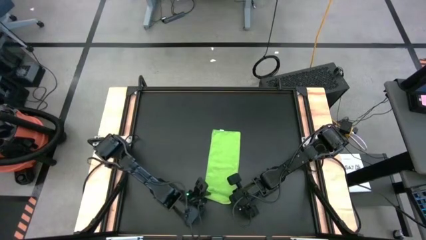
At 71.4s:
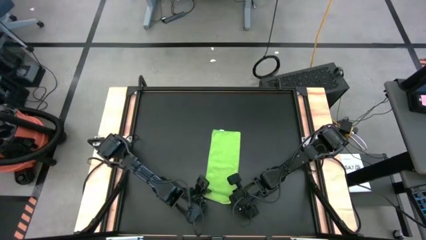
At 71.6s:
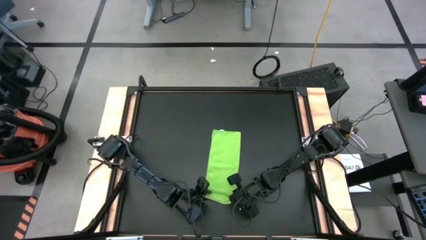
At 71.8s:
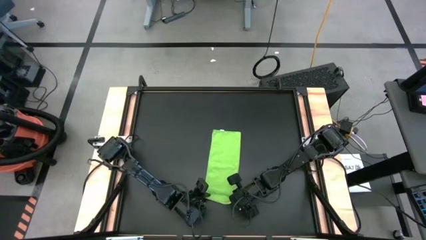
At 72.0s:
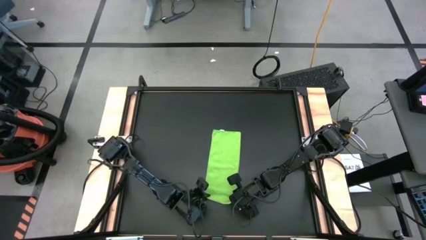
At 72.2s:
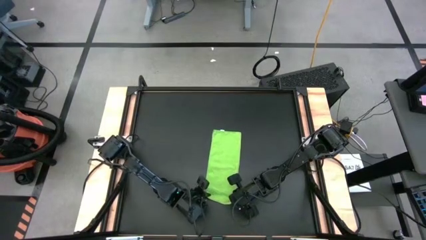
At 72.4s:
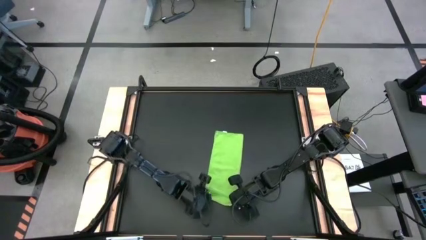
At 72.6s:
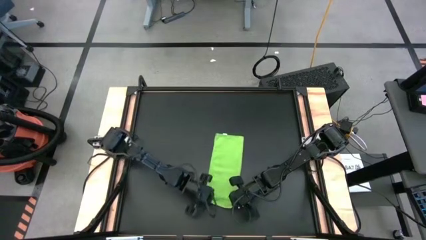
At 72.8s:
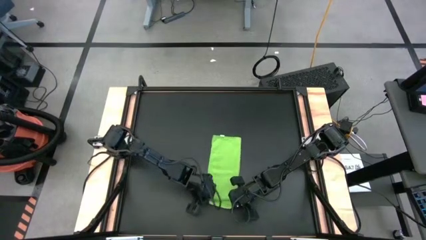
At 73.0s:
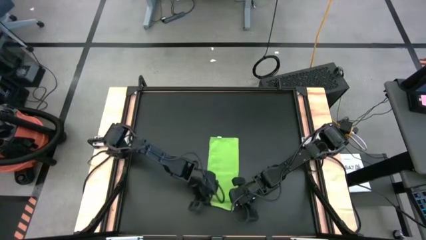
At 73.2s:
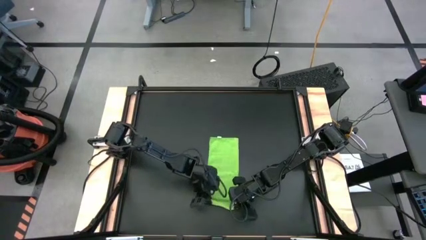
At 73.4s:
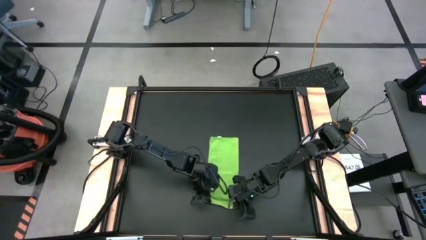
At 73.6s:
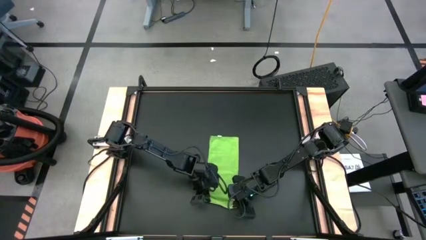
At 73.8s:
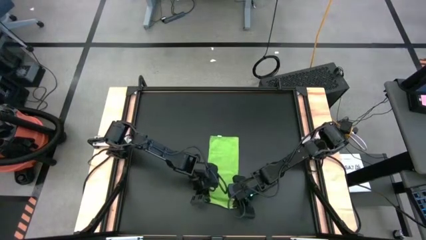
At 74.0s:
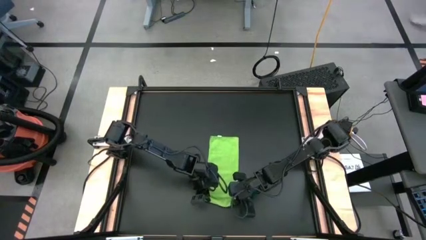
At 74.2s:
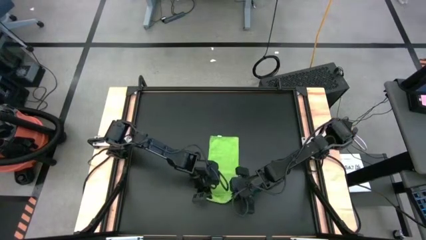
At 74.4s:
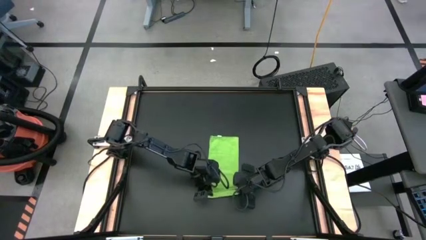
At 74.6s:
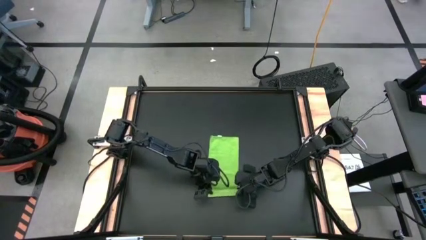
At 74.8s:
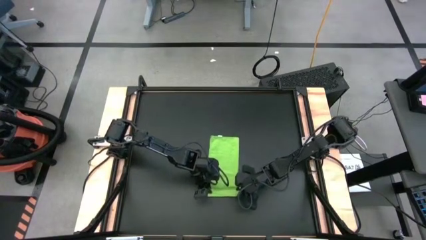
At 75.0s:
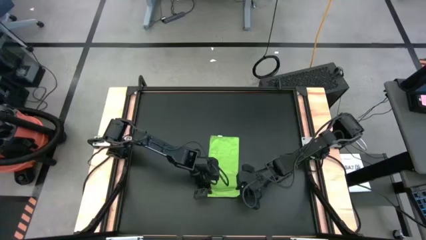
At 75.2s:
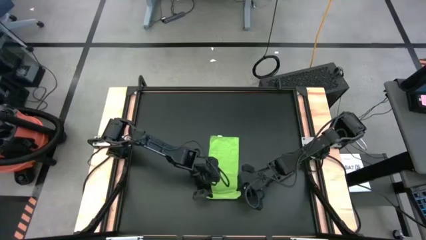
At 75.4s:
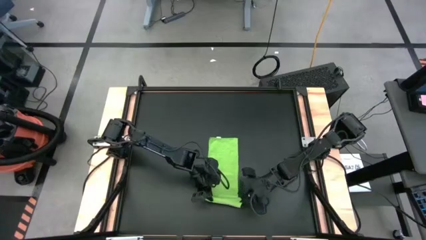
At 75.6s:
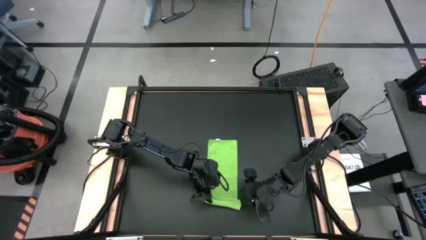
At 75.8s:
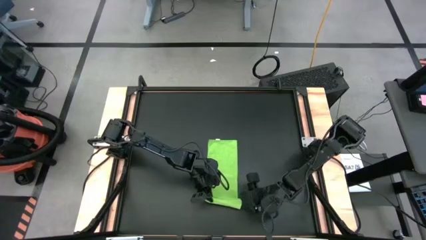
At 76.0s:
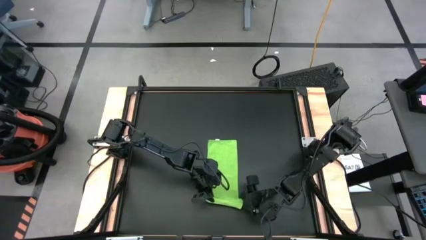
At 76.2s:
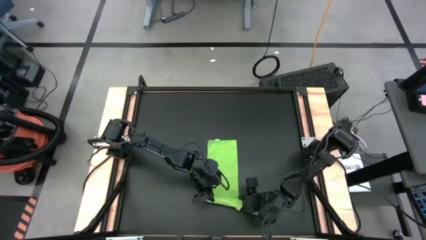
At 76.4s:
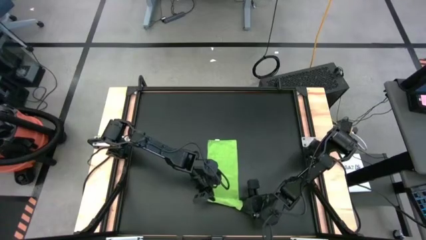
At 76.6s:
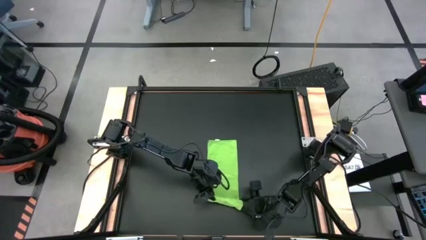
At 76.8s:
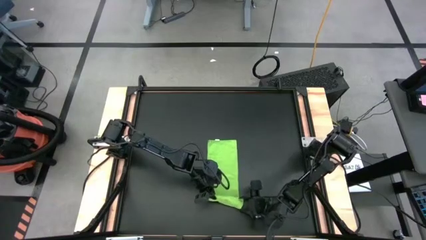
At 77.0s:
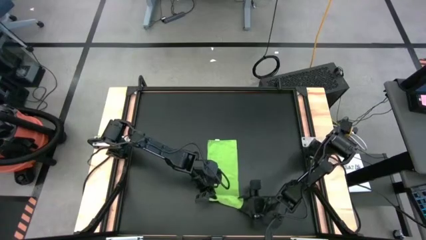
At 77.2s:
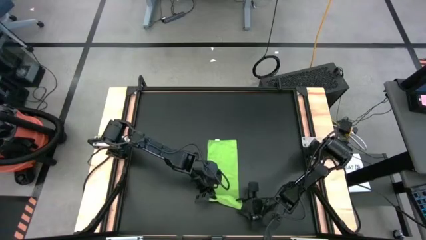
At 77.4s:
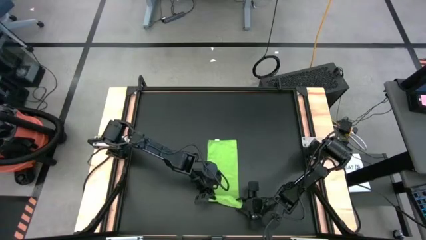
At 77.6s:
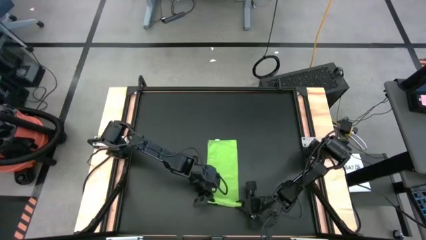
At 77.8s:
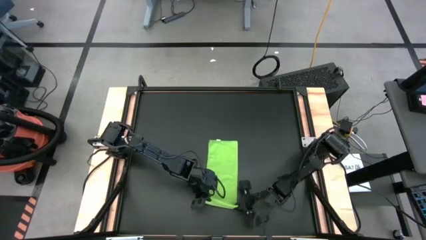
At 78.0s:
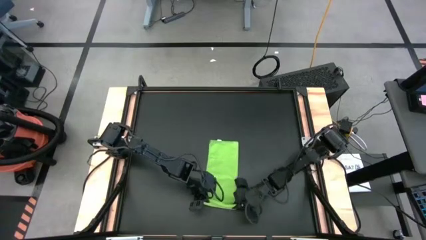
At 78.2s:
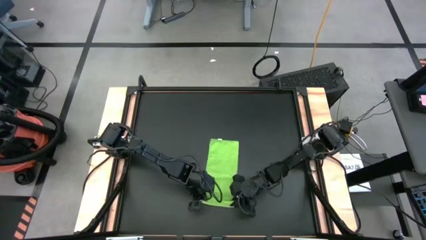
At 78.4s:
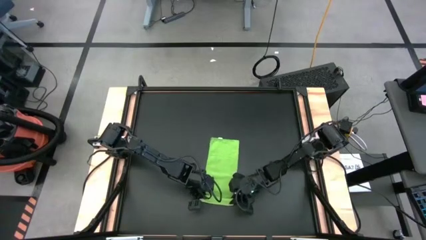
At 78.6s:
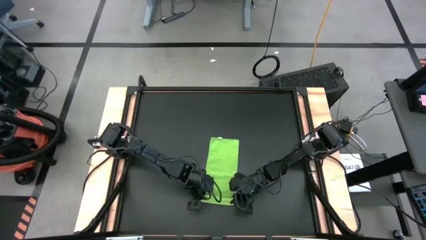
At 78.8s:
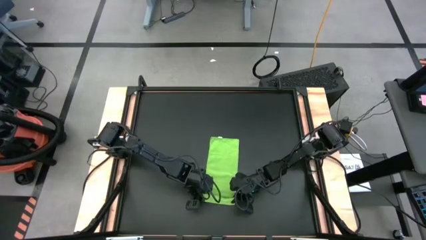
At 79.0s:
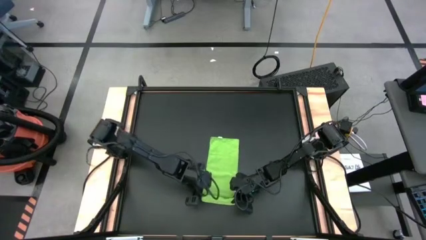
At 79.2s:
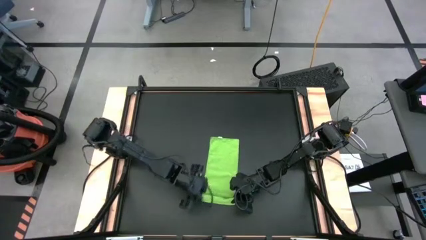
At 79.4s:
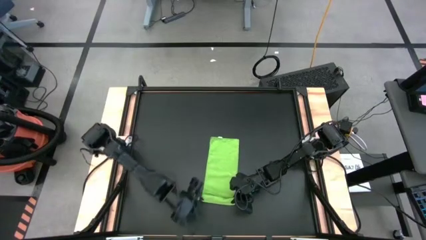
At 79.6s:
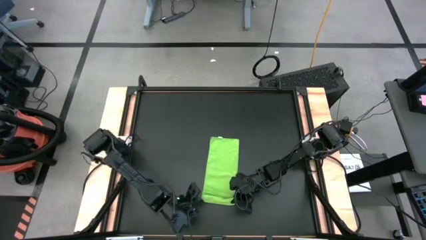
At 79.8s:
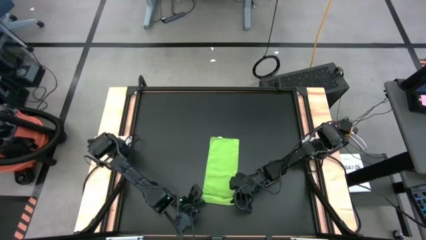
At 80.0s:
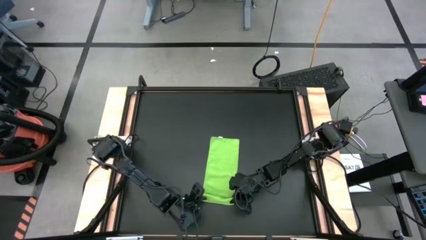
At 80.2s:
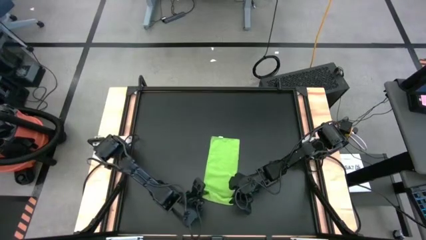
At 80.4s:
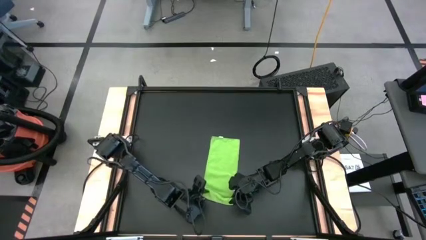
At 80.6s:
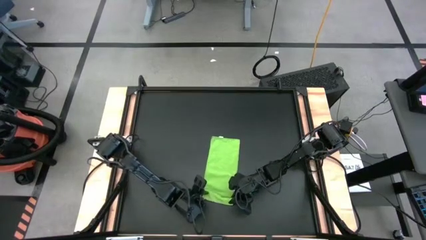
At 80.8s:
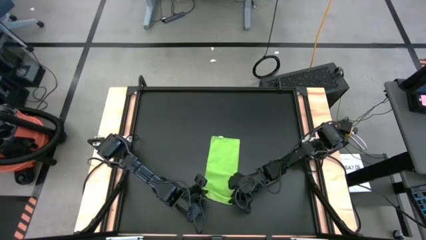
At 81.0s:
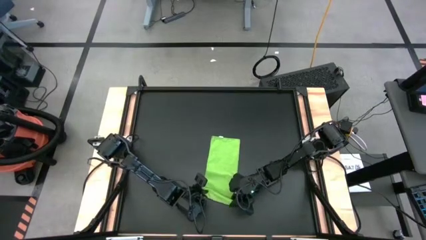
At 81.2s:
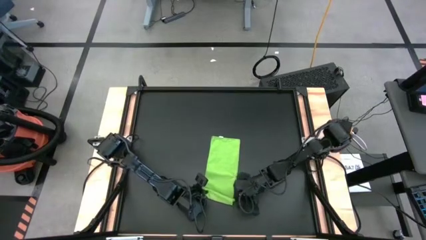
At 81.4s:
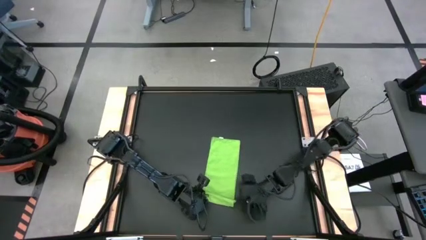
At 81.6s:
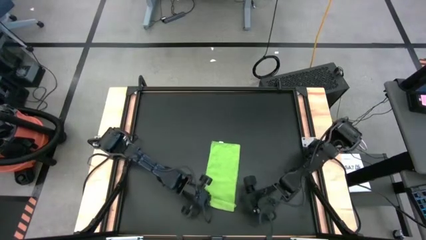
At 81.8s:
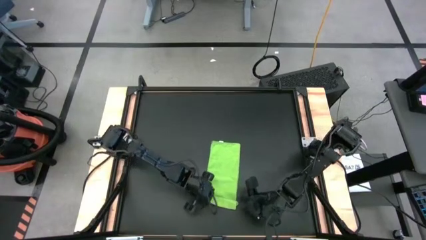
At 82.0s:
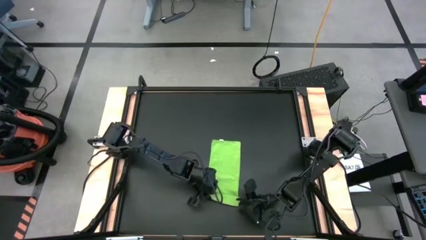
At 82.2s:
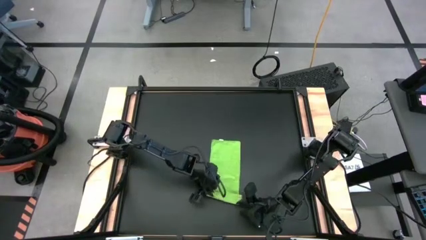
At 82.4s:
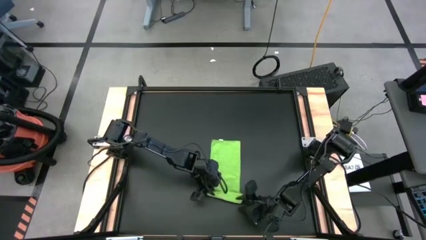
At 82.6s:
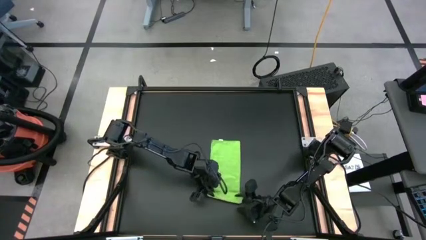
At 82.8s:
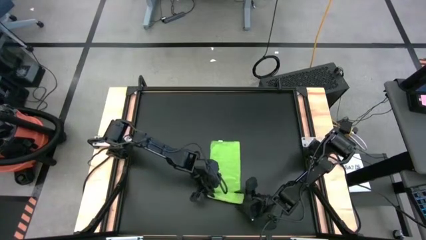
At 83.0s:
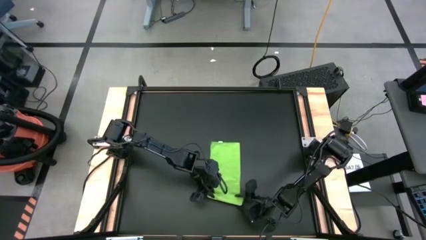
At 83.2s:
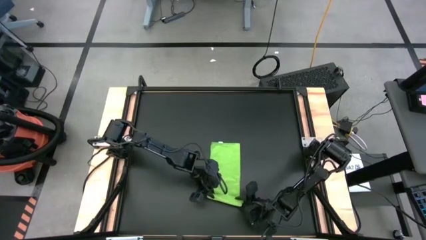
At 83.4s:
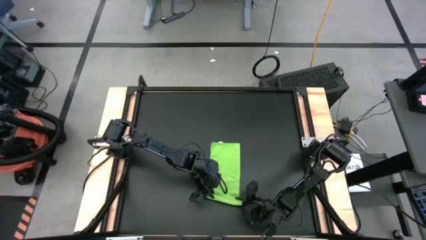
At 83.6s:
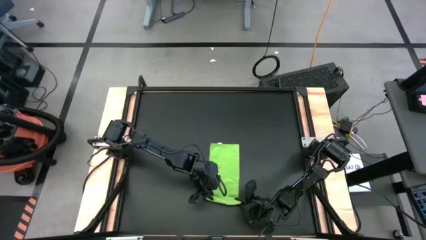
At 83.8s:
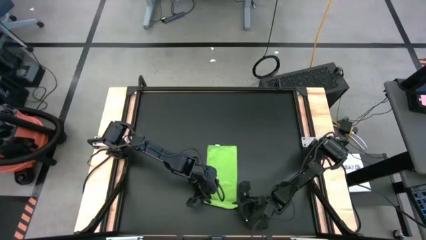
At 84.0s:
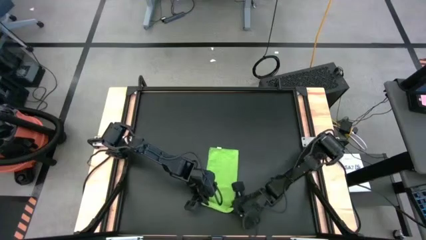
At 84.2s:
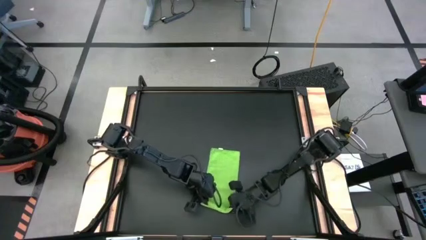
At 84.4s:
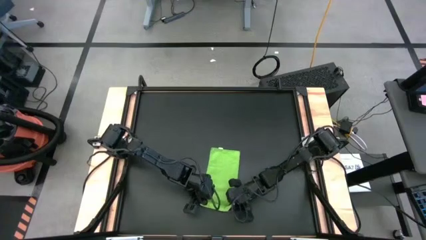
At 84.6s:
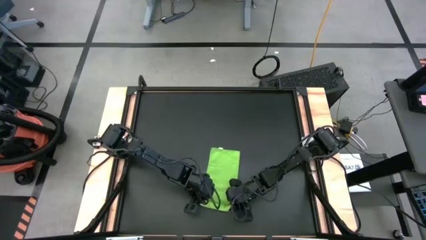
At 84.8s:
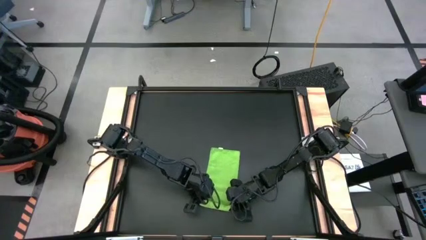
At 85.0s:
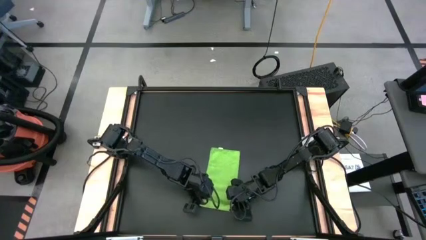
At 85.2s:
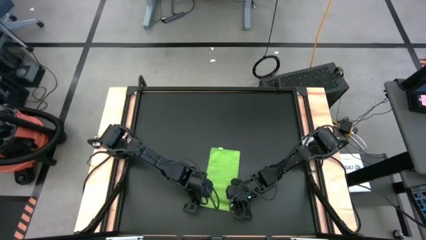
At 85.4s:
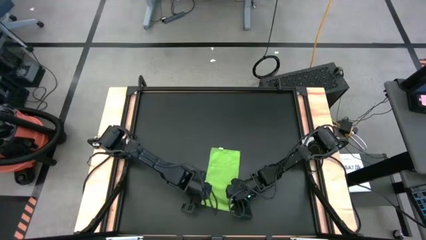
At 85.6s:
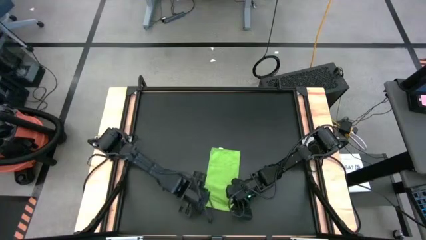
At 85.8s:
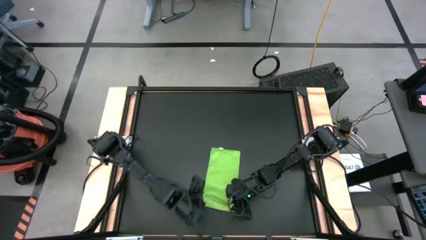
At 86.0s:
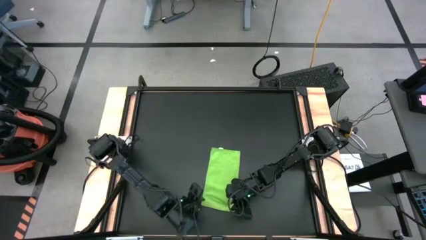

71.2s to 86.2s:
Task: Roll towel into tight, uniform cylinder
Roll the green towel

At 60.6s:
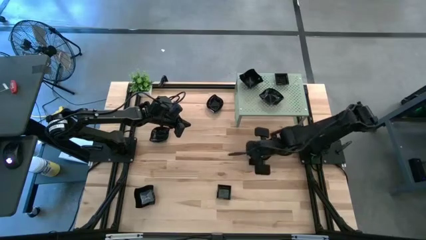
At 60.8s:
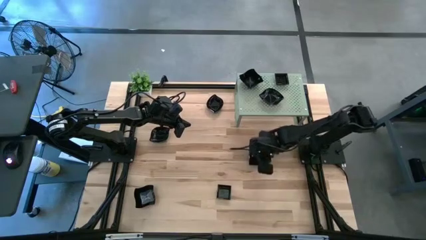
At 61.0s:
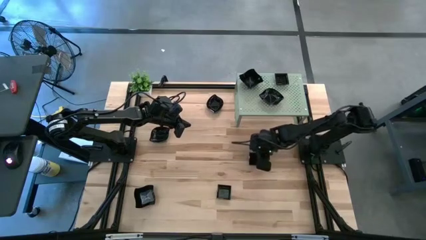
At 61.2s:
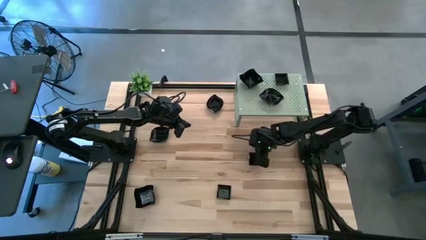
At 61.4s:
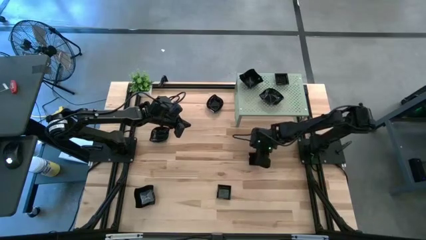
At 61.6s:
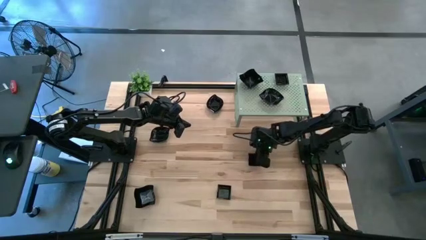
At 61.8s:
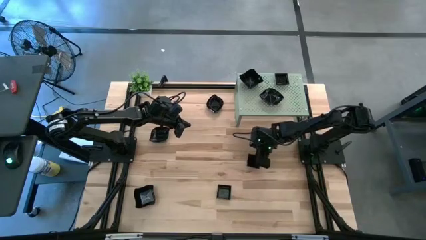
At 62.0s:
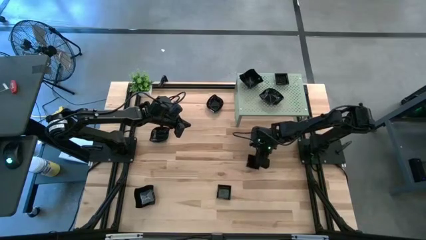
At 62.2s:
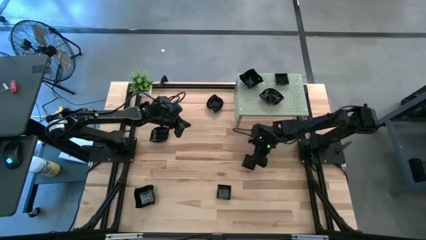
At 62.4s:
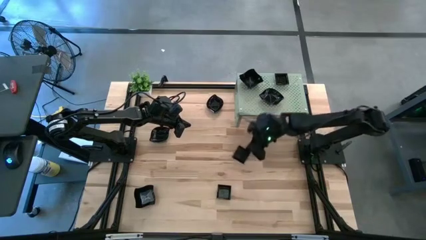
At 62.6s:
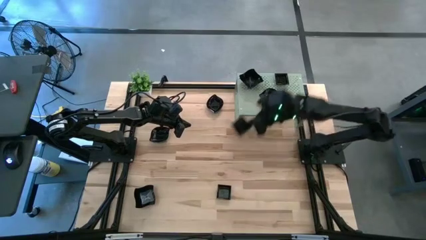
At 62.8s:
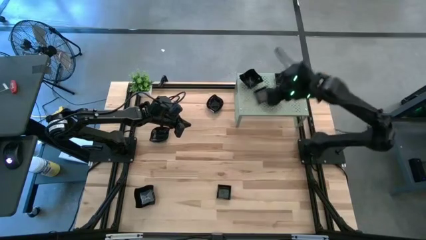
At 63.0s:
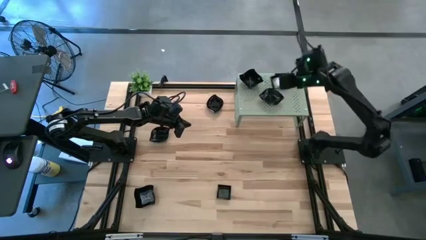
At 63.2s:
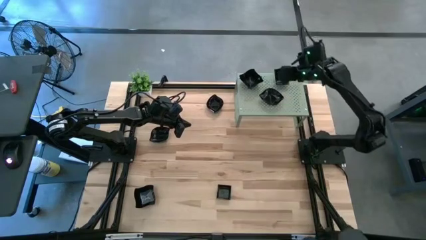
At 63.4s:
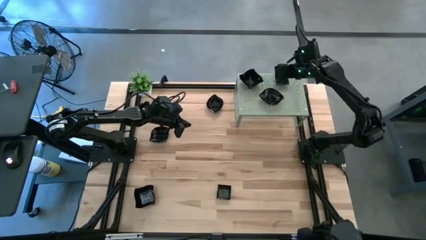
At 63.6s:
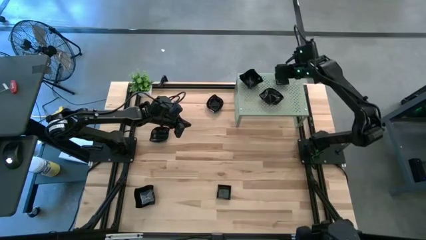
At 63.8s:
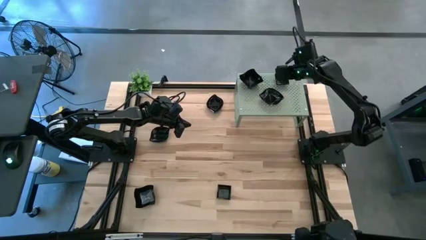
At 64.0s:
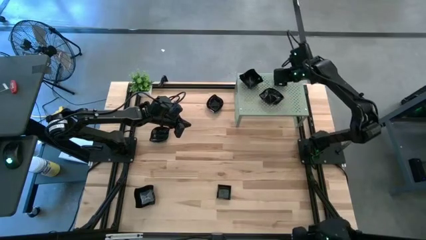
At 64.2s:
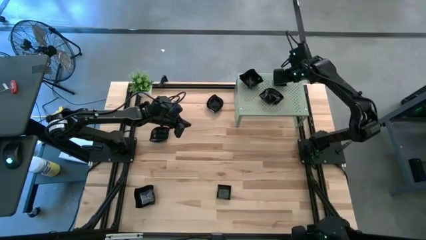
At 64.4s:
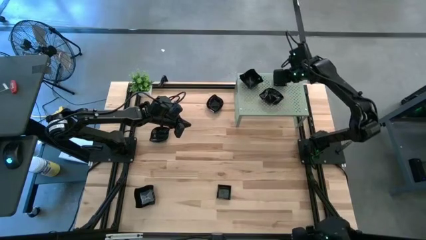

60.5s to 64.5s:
Task: Pick & Place Mini shaped plates
Stack the square plate on top of the square plates on the shelf
